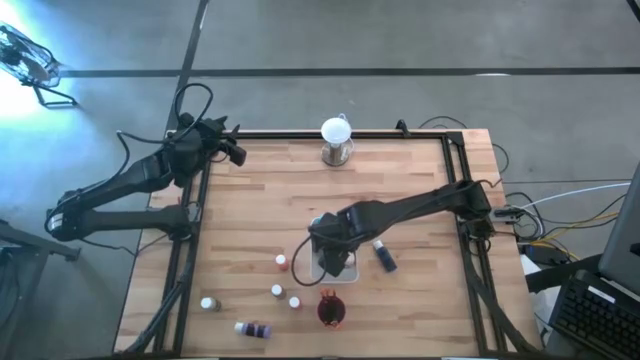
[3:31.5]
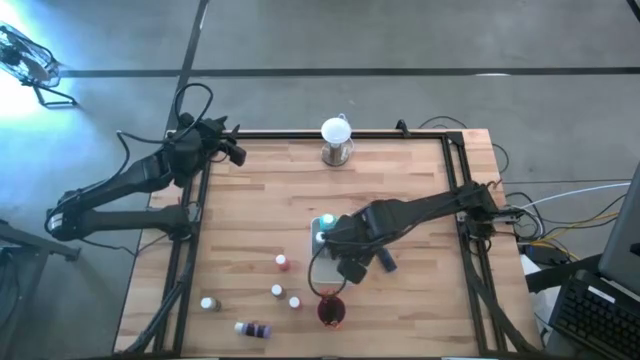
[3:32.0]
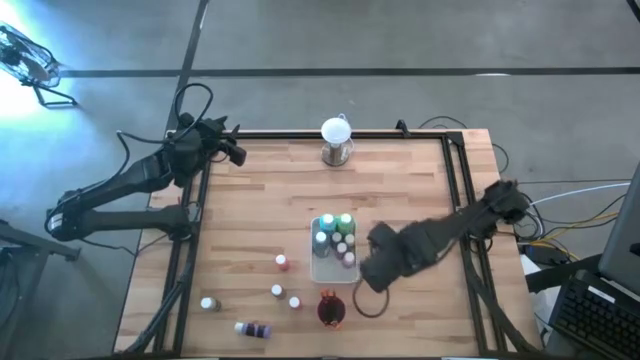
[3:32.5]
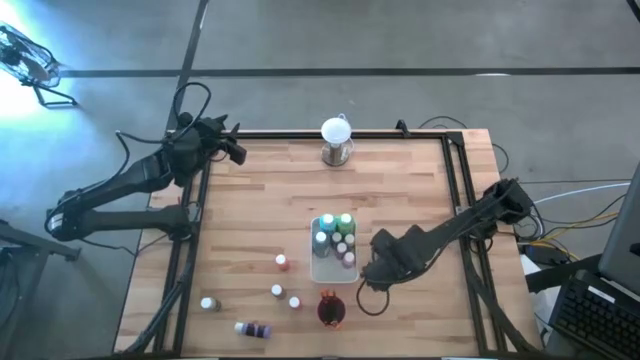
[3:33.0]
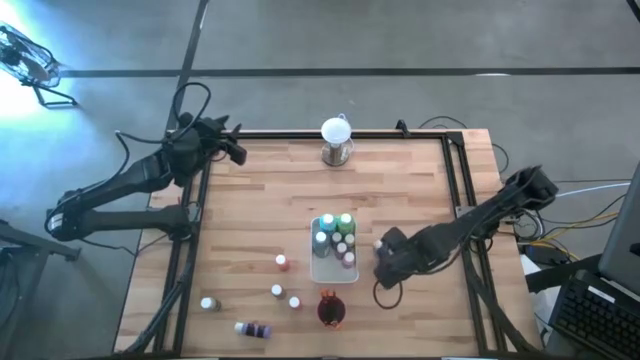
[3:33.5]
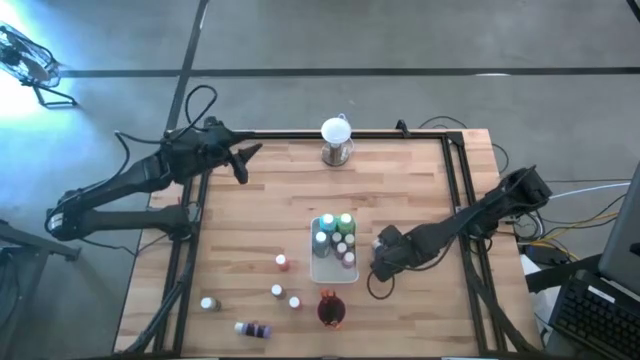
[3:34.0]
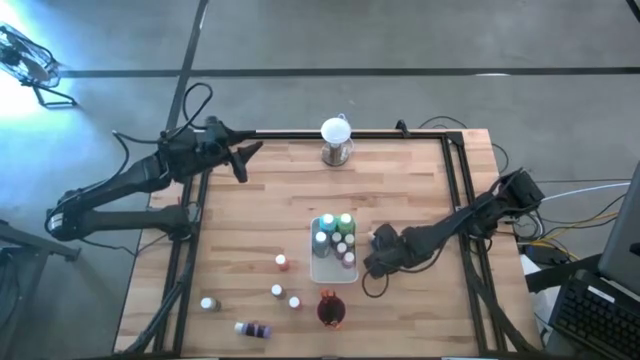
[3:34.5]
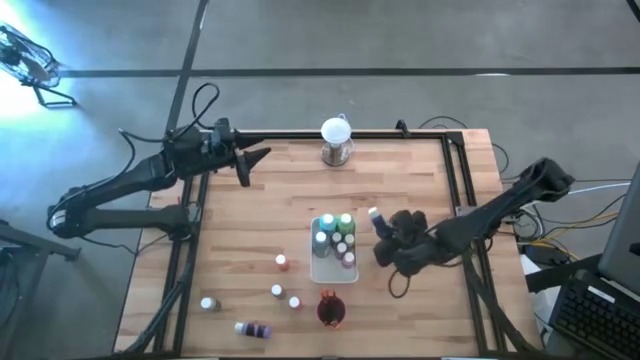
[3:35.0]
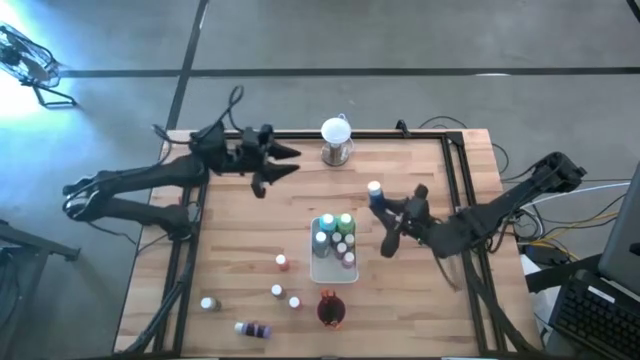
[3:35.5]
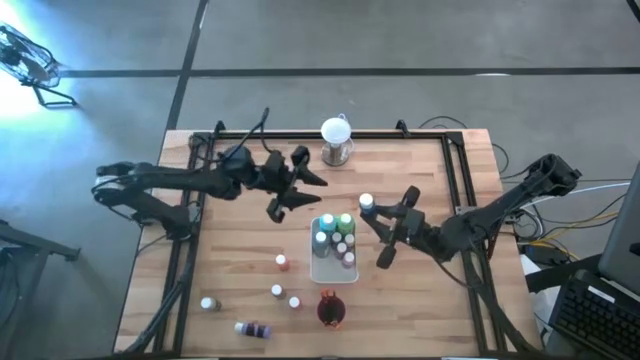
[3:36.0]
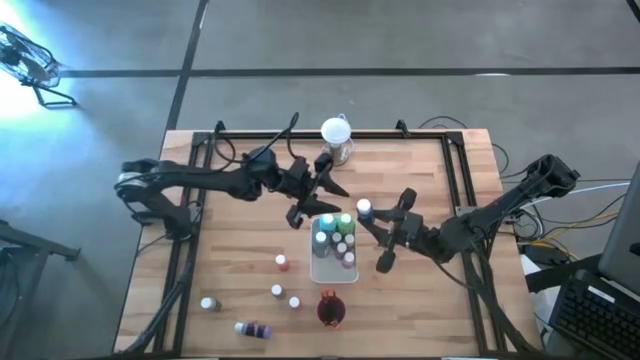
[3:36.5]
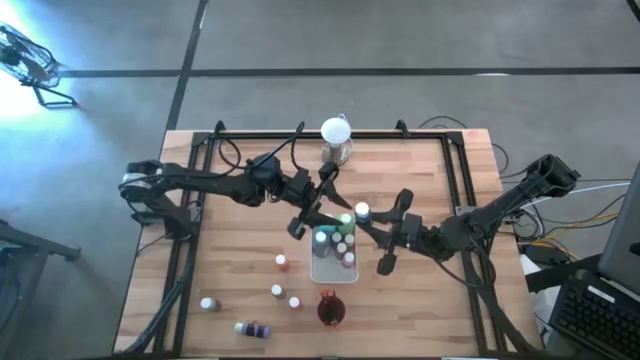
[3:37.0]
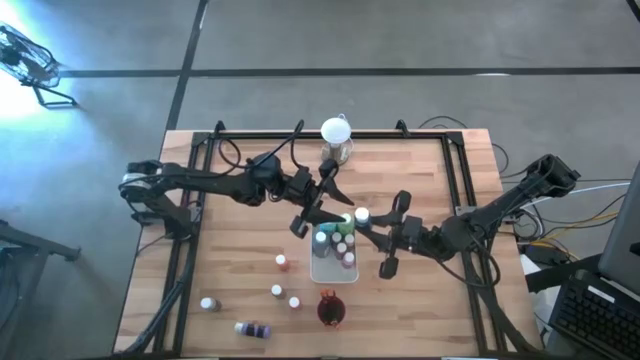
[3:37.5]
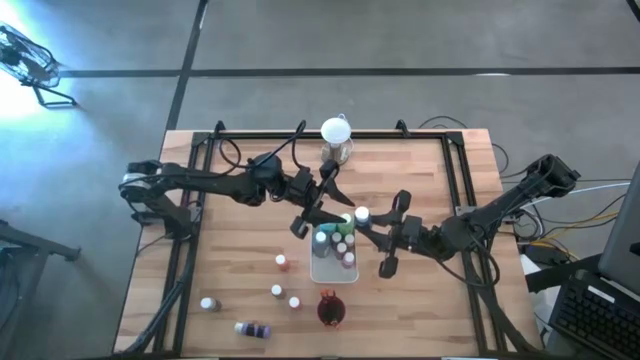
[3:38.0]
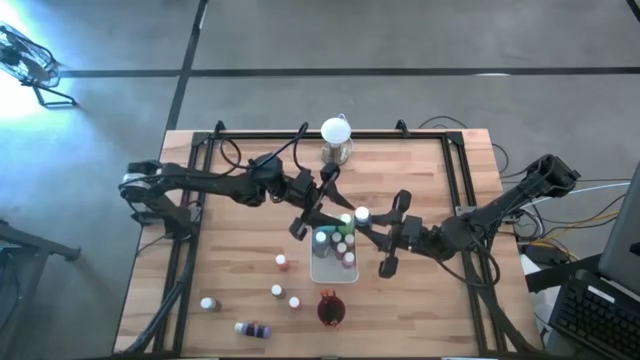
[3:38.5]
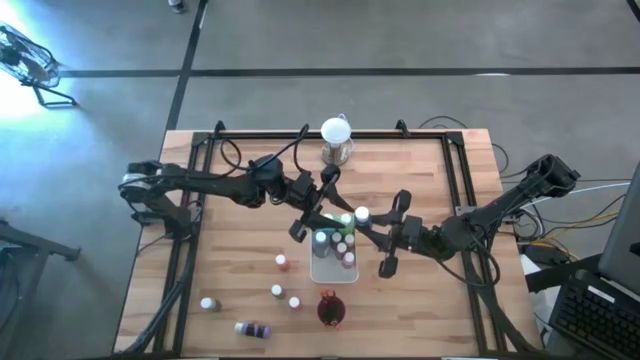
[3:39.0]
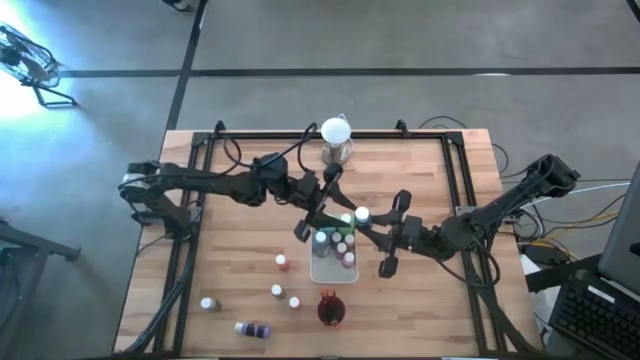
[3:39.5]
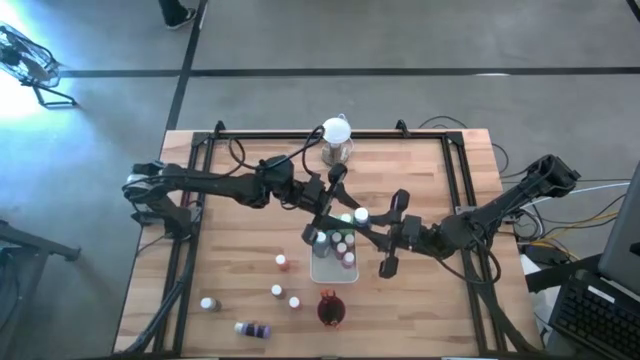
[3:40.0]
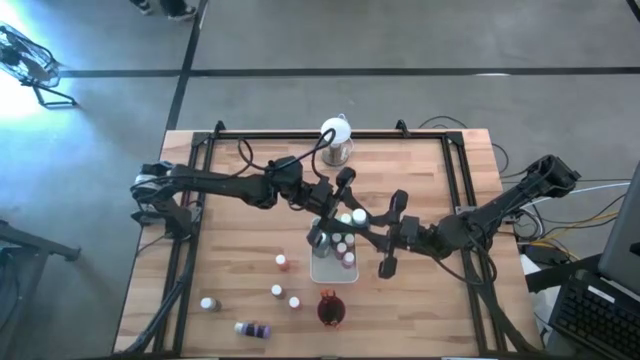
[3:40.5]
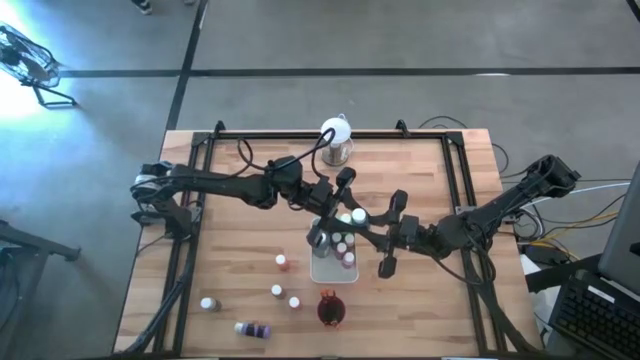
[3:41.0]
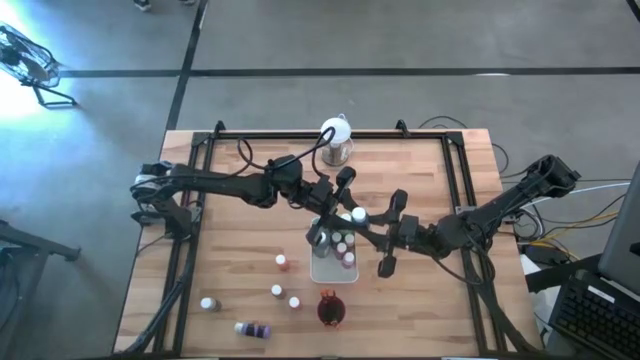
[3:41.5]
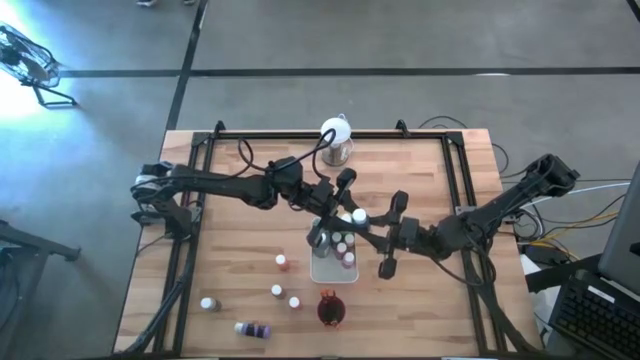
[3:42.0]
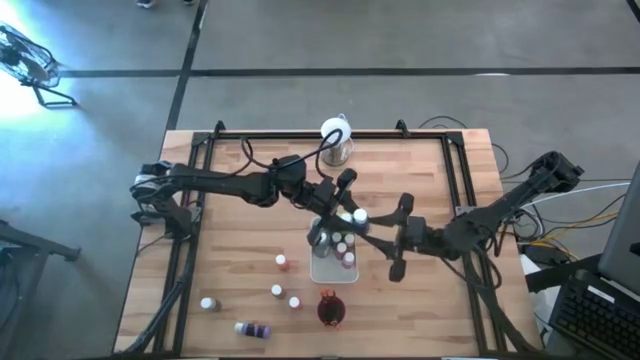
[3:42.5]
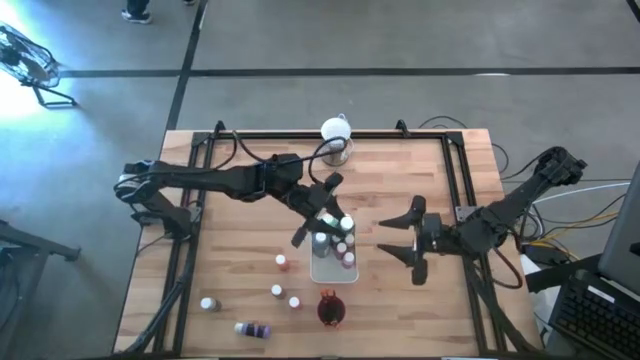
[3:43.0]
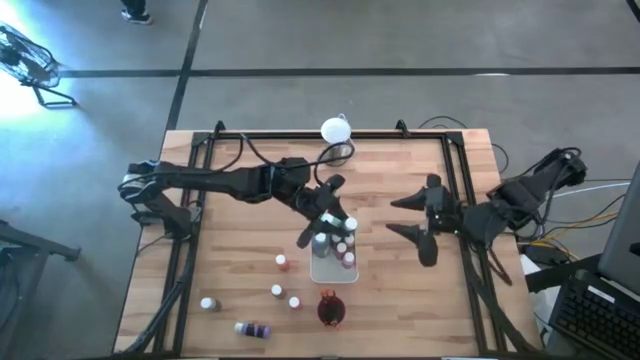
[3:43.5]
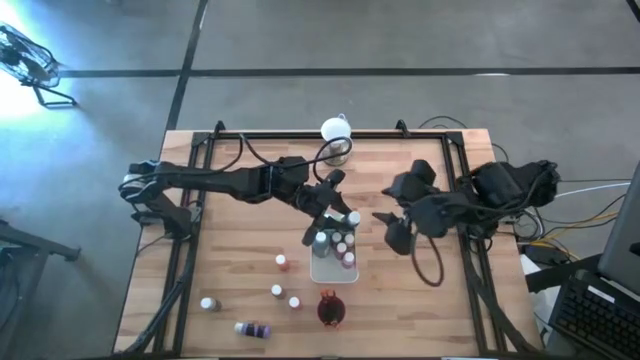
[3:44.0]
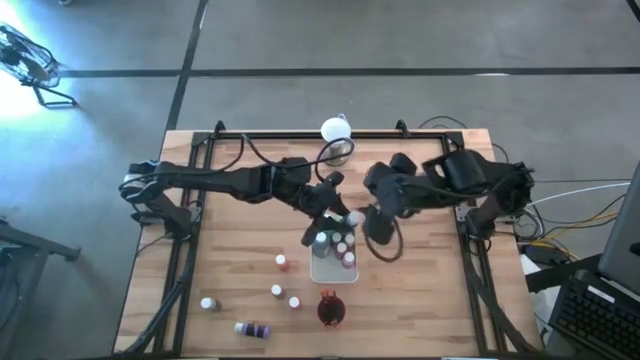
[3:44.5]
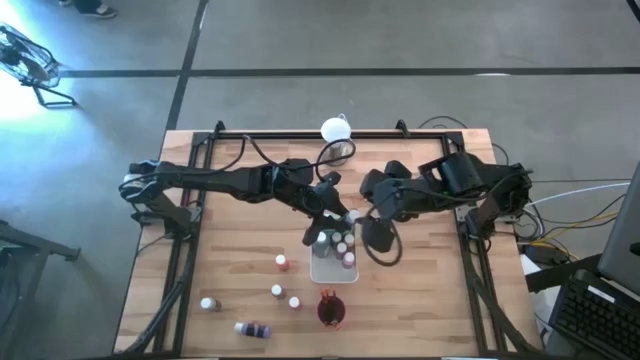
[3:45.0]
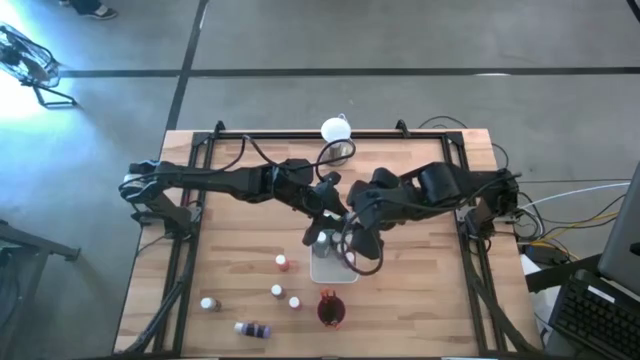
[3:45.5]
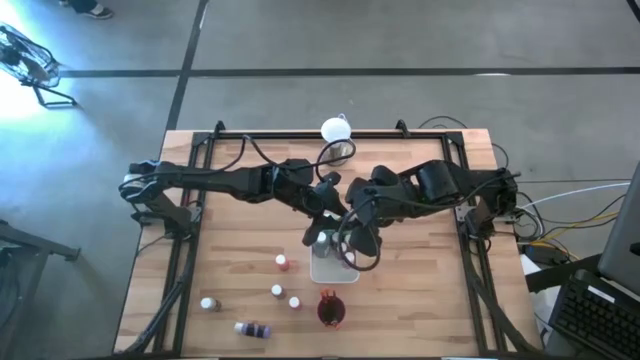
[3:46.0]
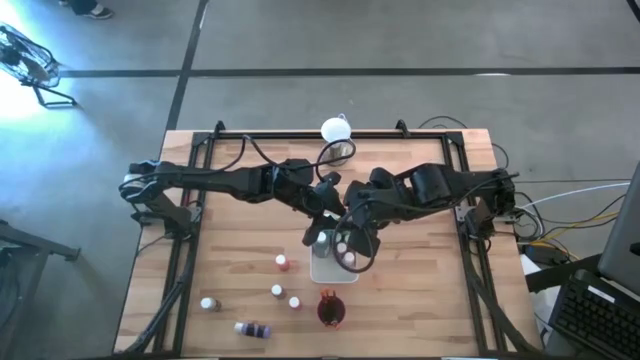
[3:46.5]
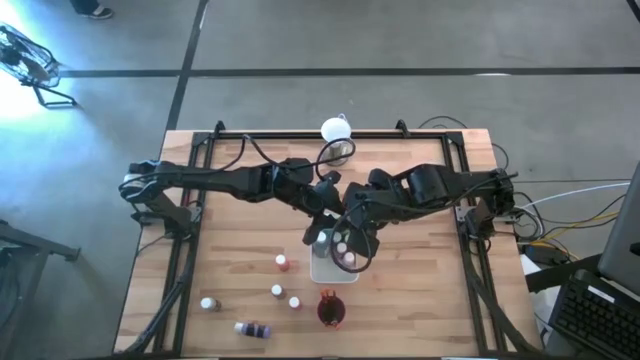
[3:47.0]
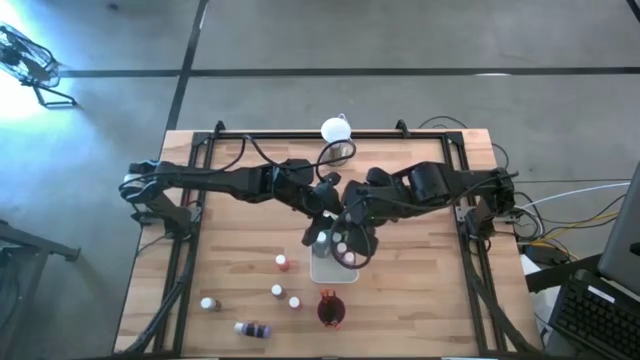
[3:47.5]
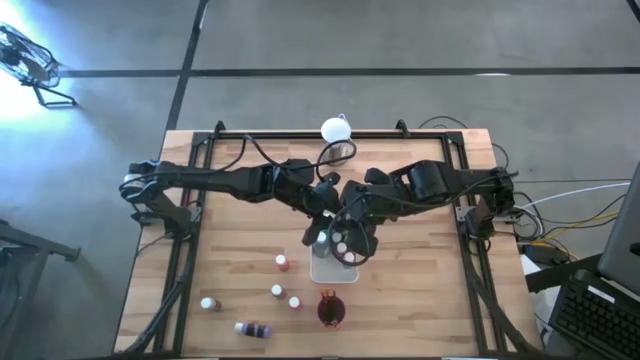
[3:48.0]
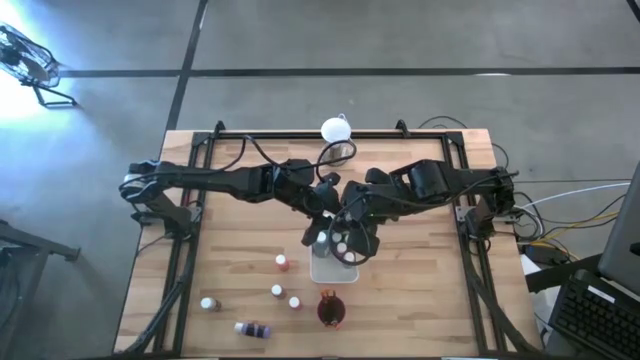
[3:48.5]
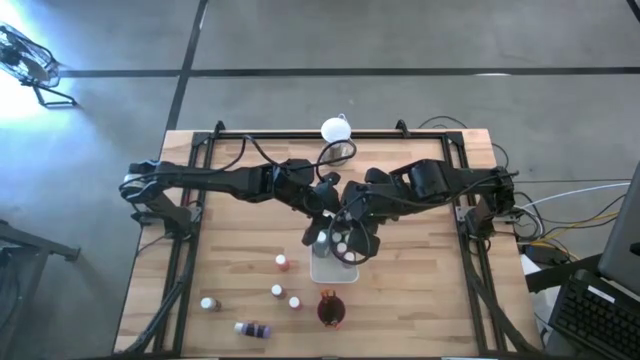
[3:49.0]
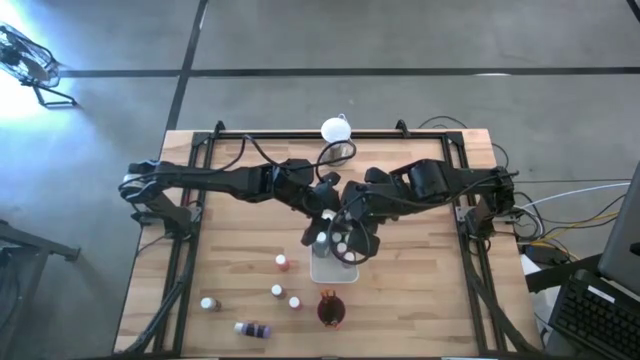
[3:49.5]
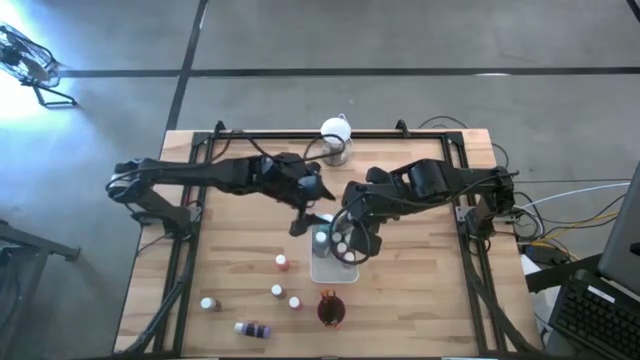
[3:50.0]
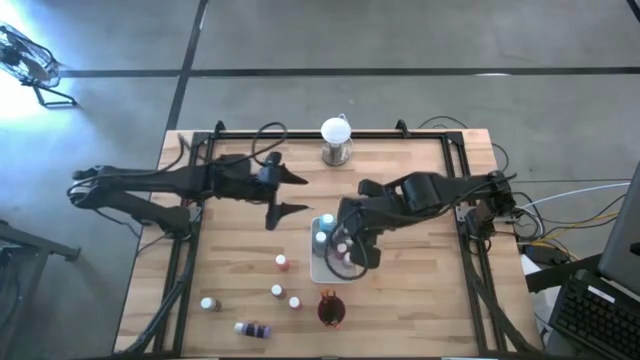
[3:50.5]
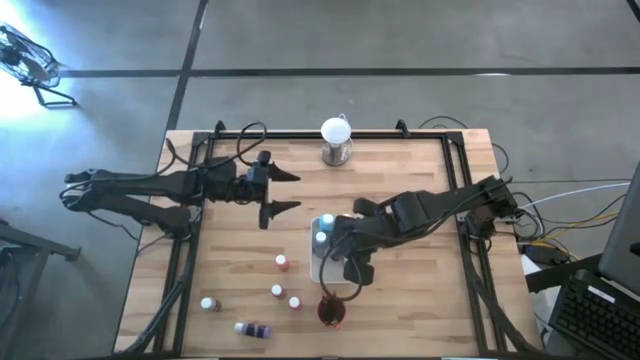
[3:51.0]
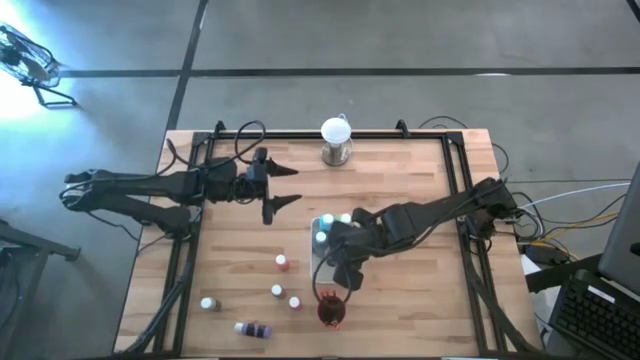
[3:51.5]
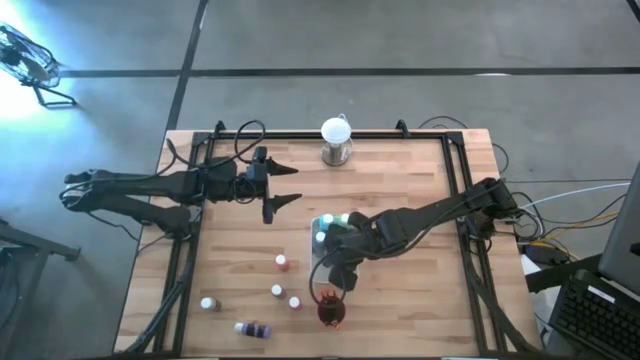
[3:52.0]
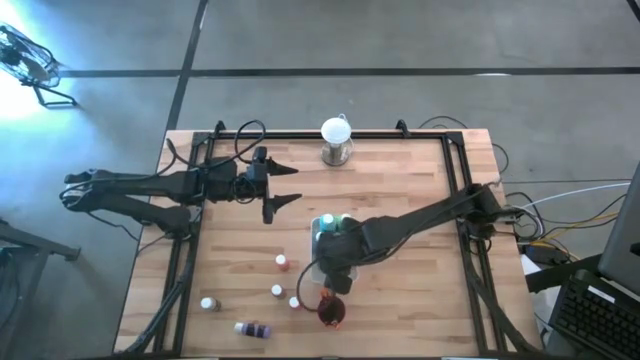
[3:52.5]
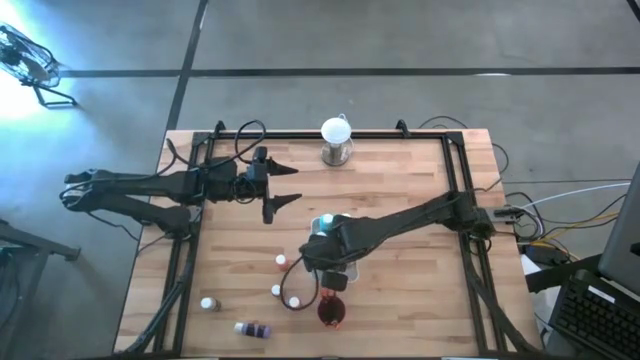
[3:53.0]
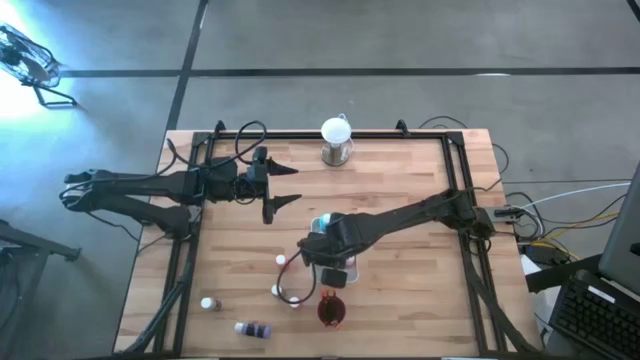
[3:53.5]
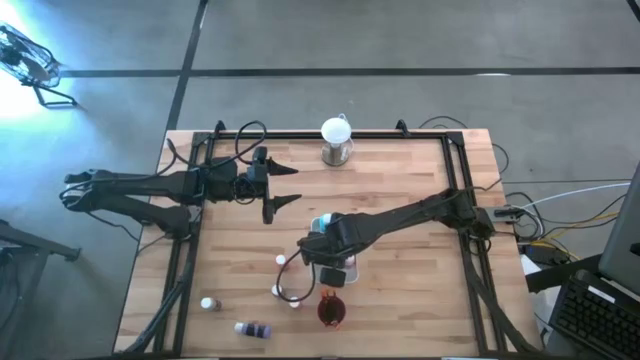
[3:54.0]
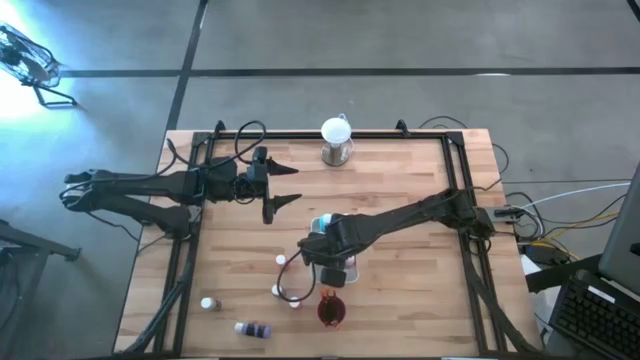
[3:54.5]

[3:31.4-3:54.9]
Task: Pick & Place Paint Supplies
Put the blue paint bottle into the white bin
